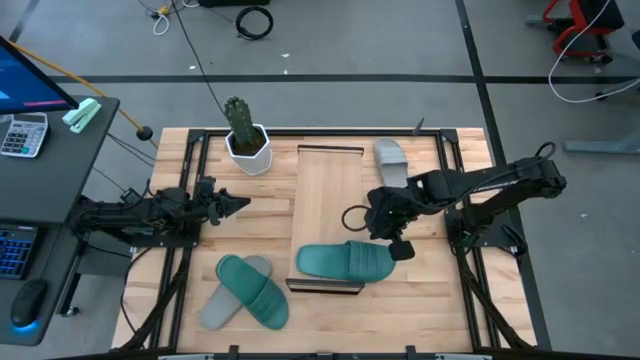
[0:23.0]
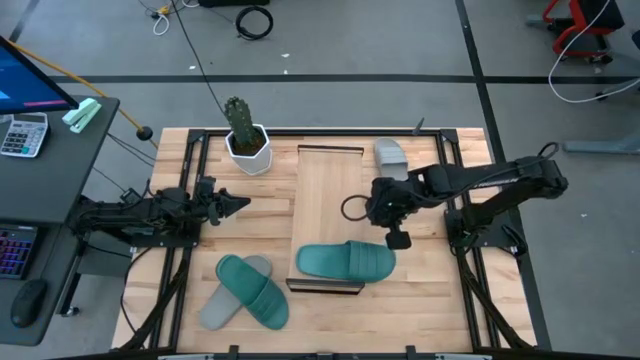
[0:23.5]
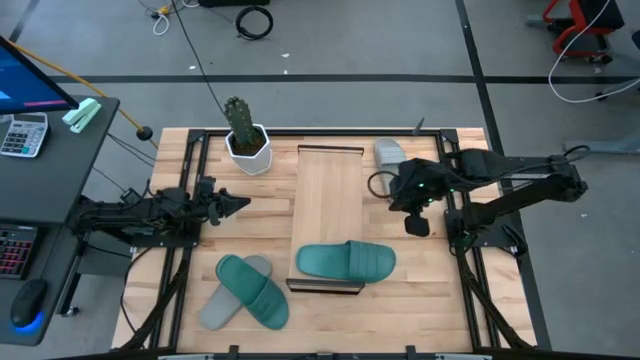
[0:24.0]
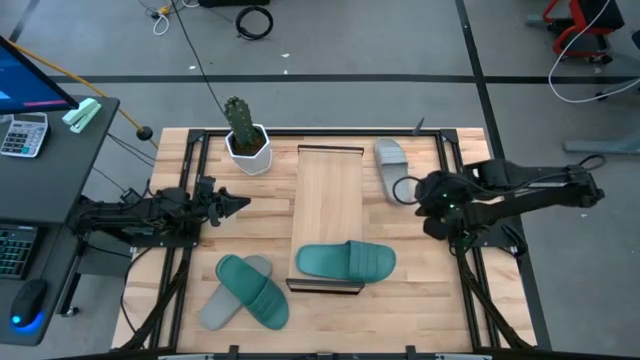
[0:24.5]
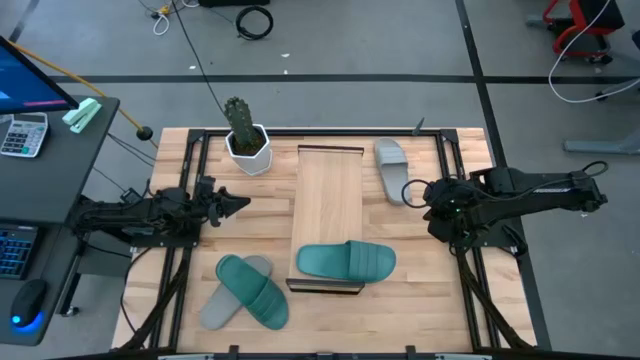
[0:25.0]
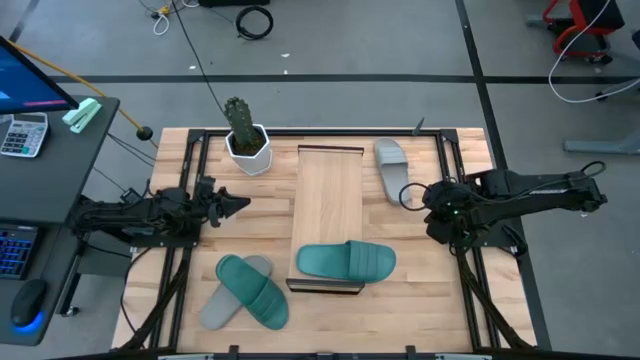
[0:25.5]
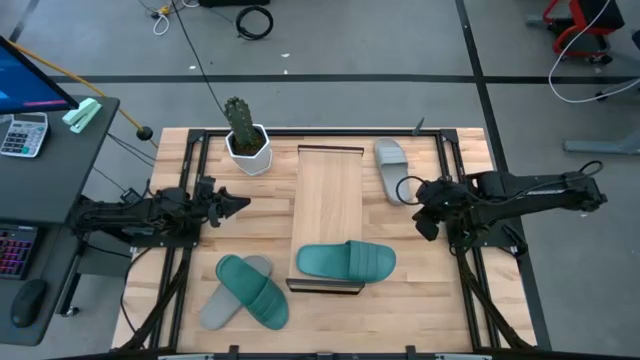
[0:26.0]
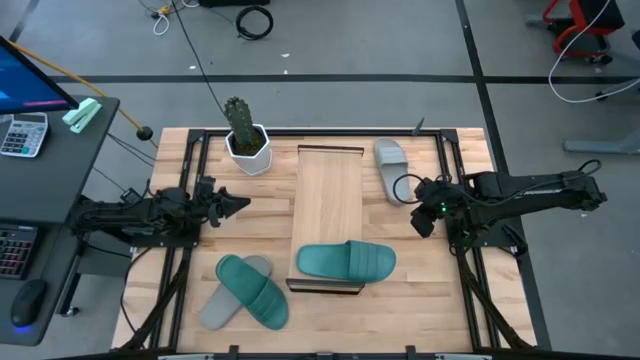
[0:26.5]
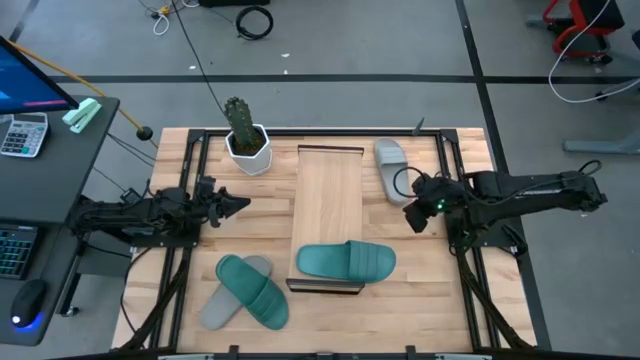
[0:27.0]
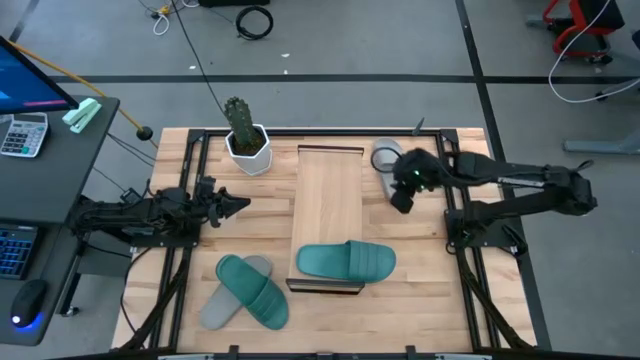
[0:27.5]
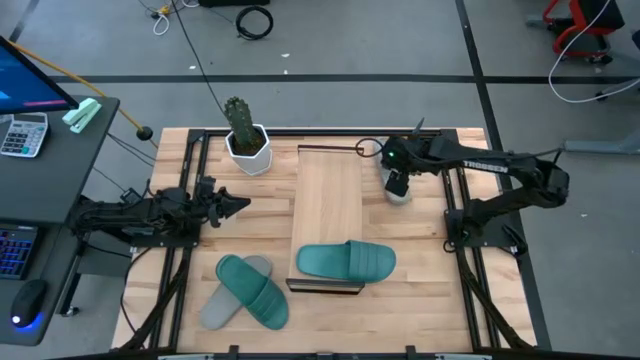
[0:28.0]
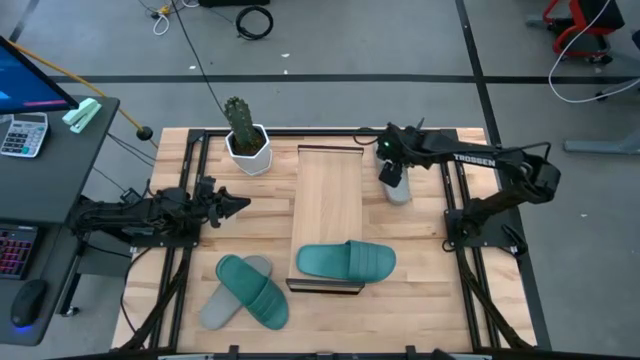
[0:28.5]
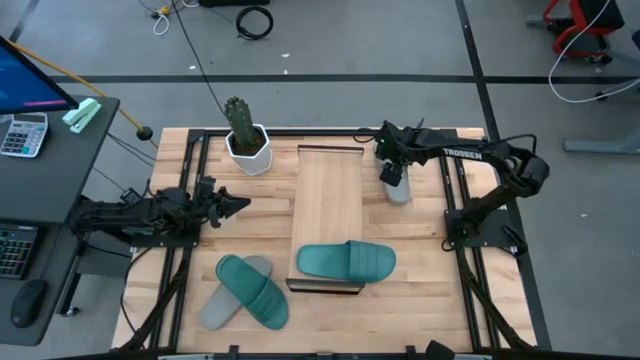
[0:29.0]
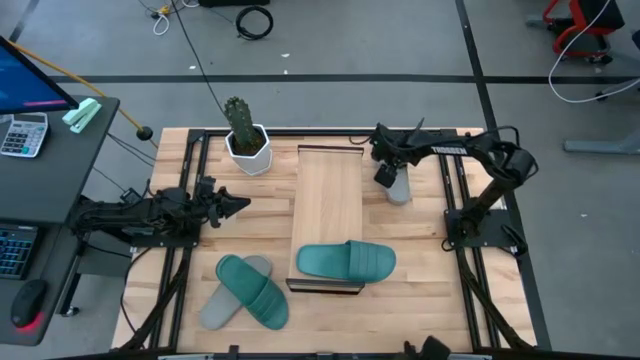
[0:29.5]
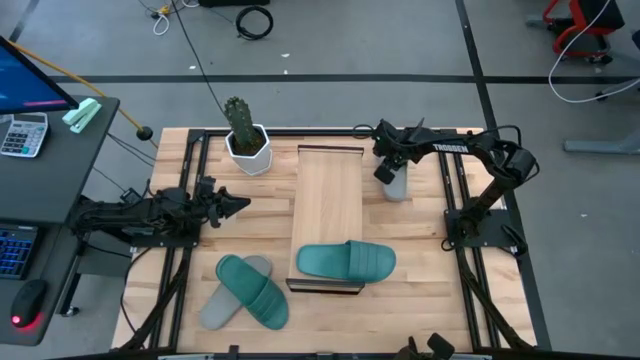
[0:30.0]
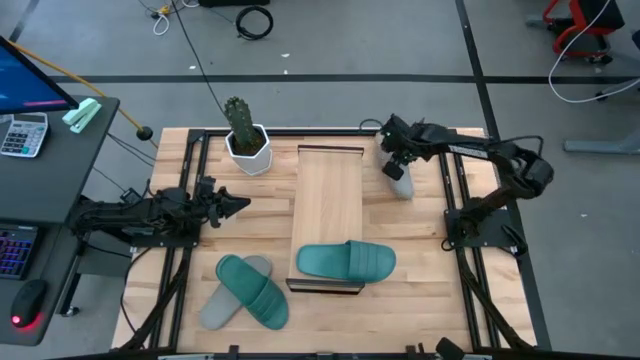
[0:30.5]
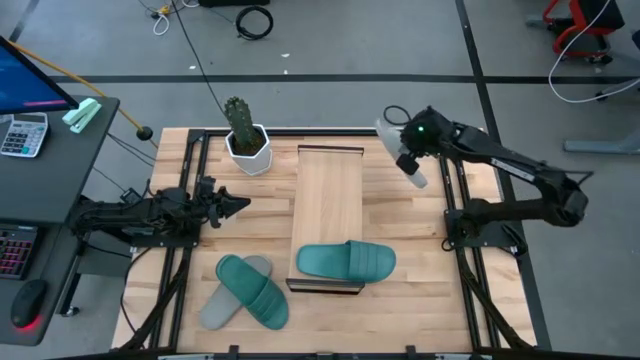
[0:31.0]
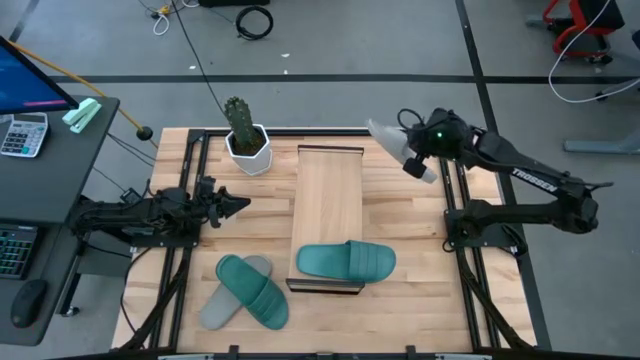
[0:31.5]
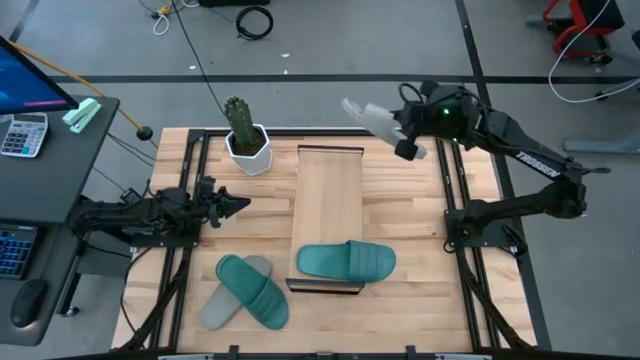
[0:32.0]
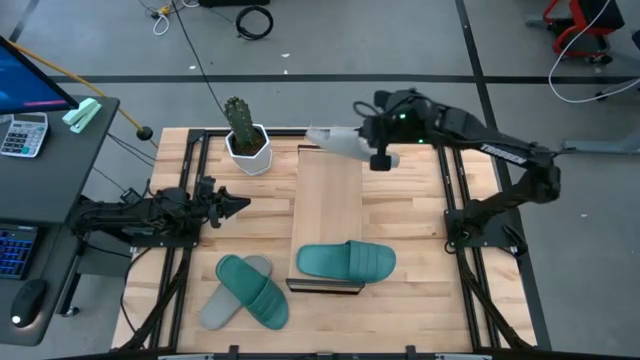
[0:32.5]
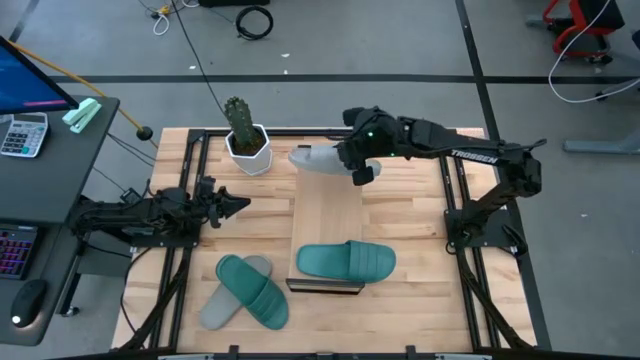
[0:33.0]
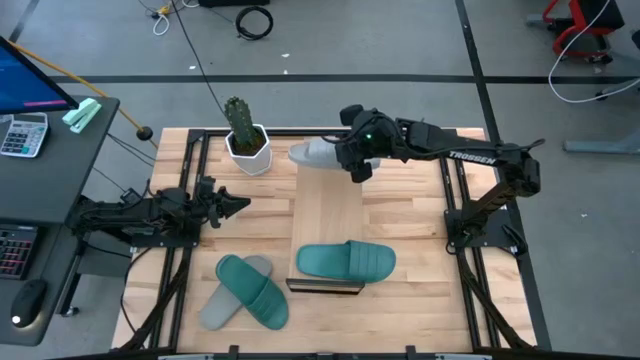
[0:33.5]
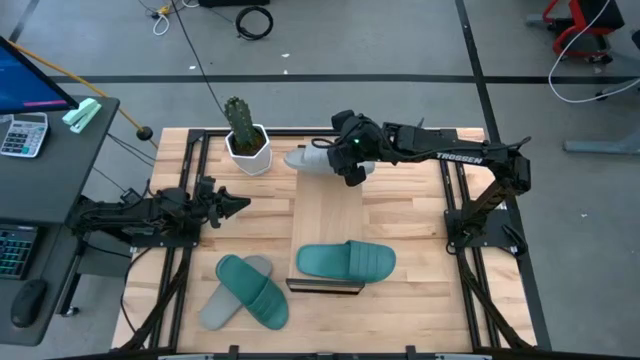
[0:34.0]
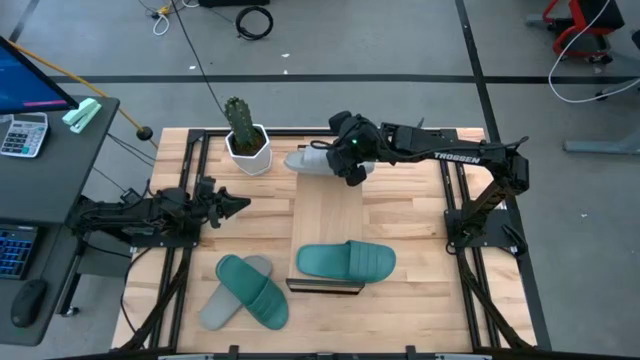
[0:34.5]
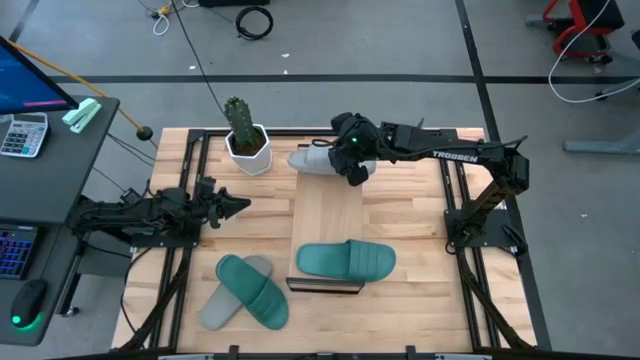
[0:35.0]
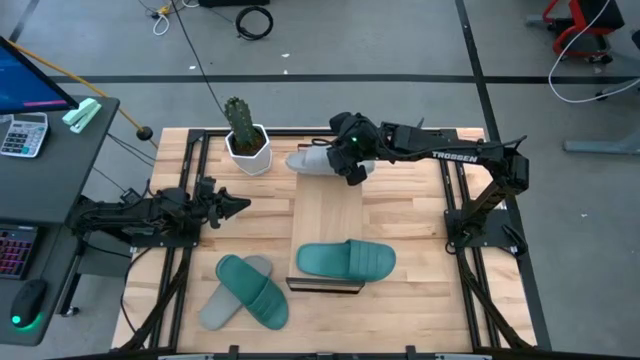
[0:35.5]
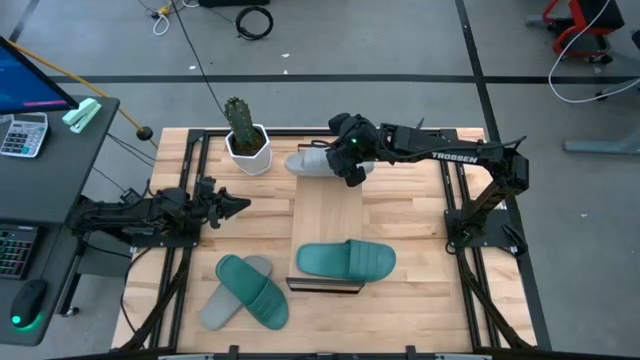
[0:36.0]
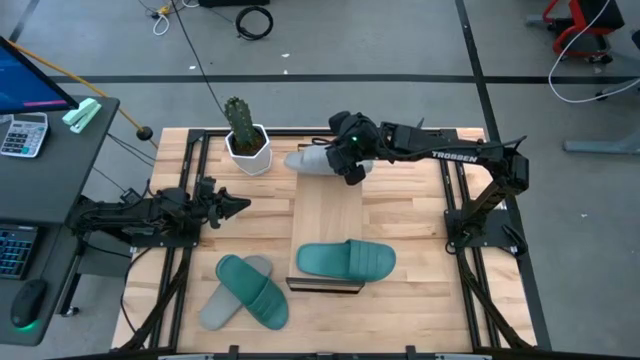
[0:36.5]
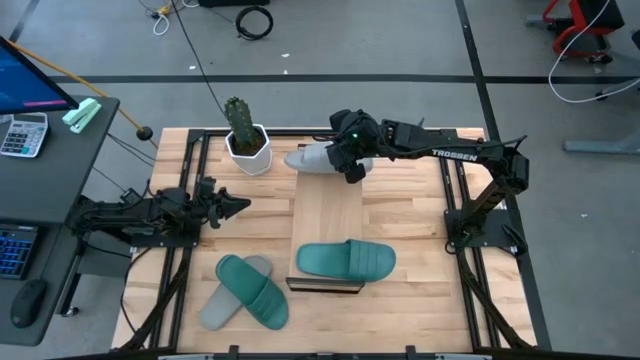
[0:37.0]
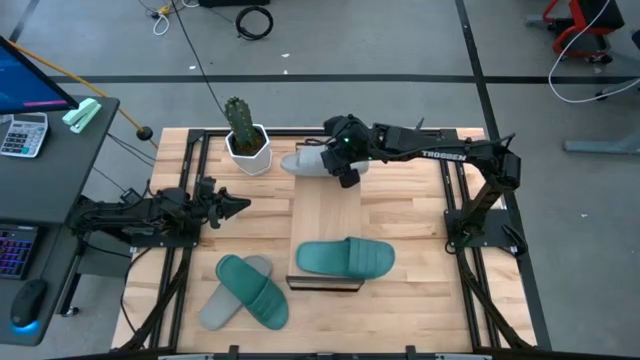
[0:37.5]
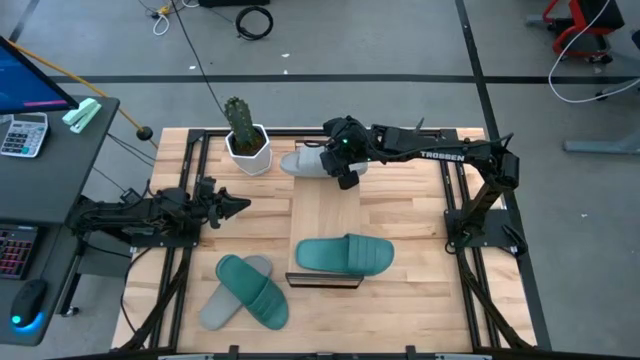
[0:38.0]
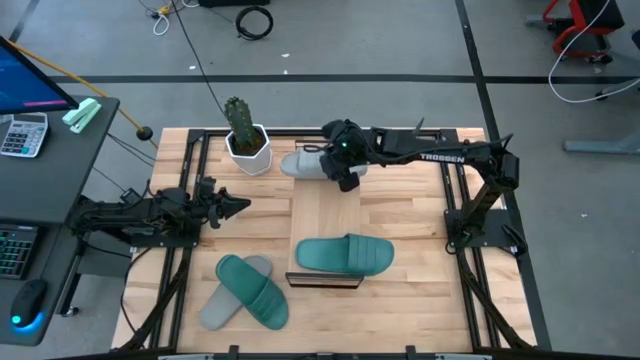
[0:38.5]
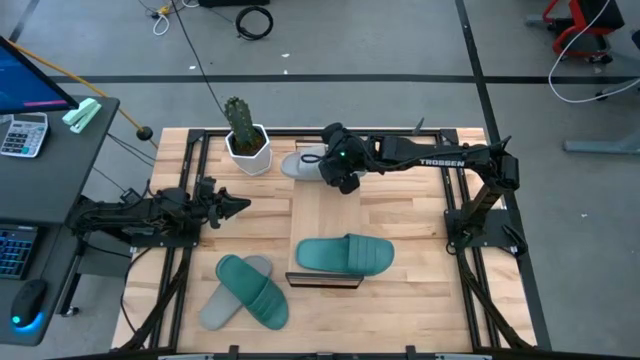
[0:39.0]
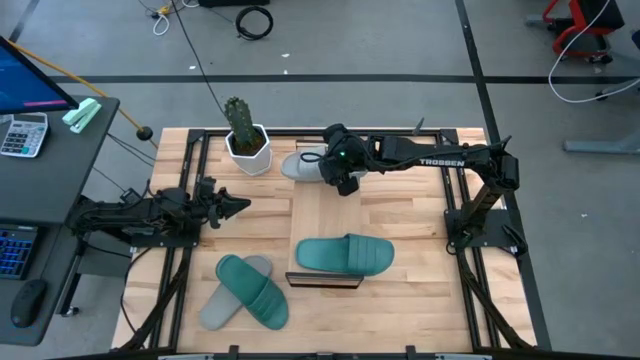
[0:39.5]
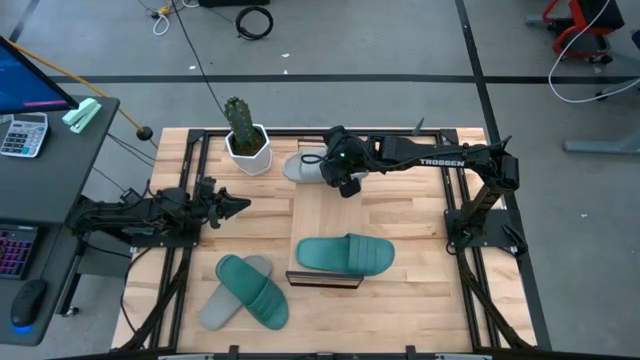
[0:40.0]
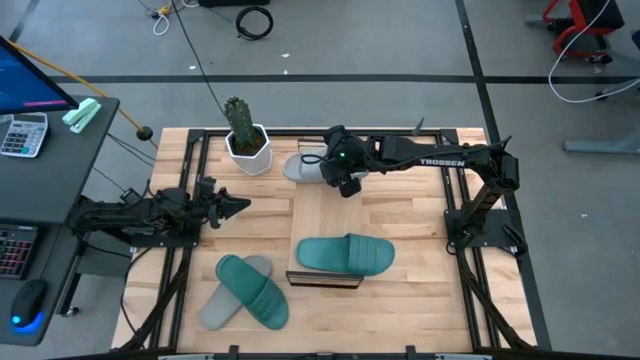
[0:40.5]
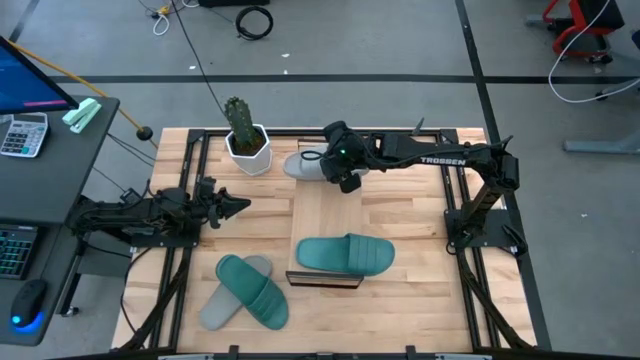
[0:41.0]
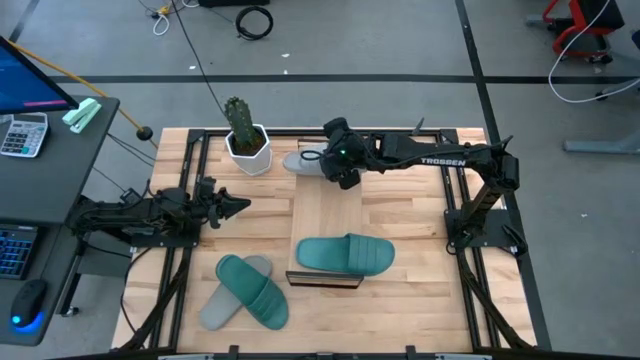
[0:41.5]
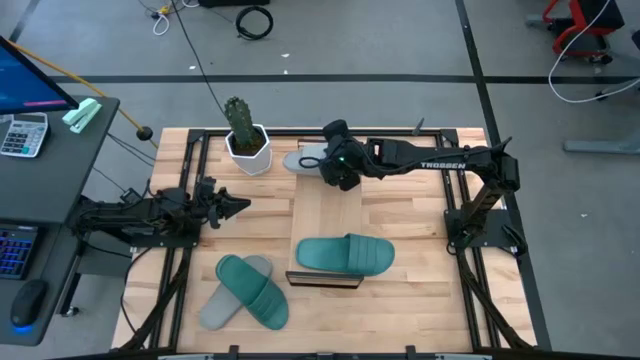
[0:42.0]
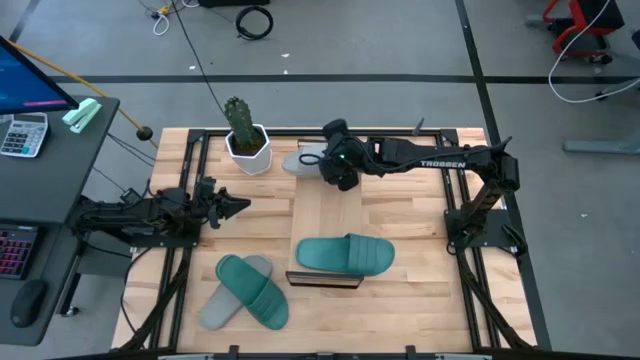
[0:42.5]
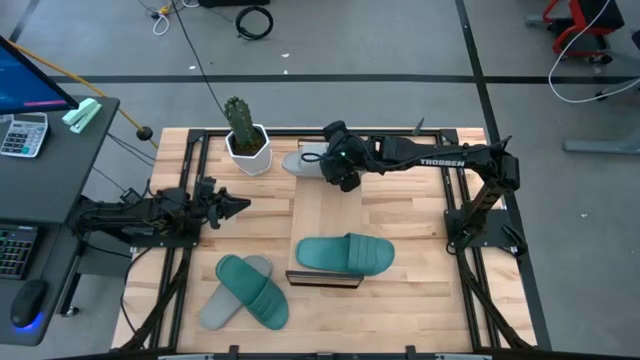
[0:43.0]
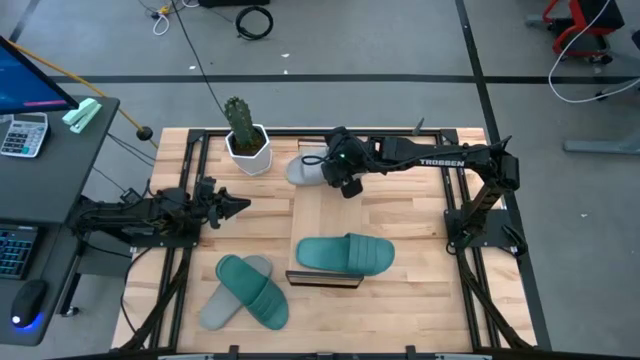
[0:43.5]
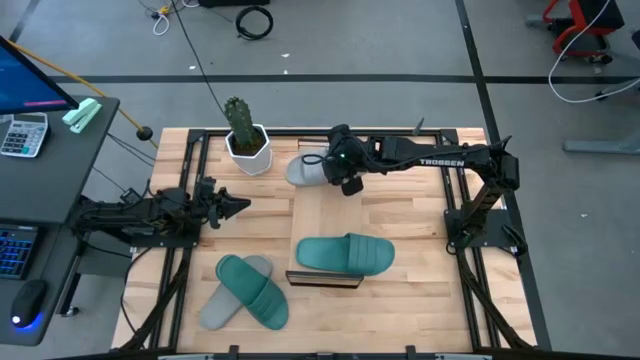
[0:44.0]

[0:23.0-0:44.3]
Task: Pick and place slides into the shelf
Put the right gray slipper on the shelf
